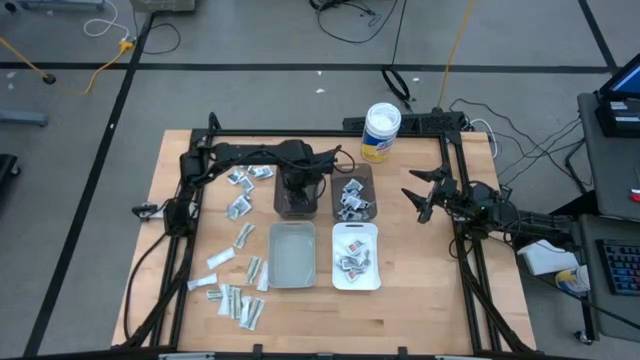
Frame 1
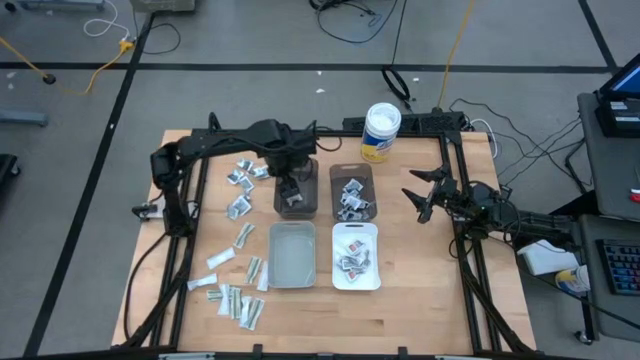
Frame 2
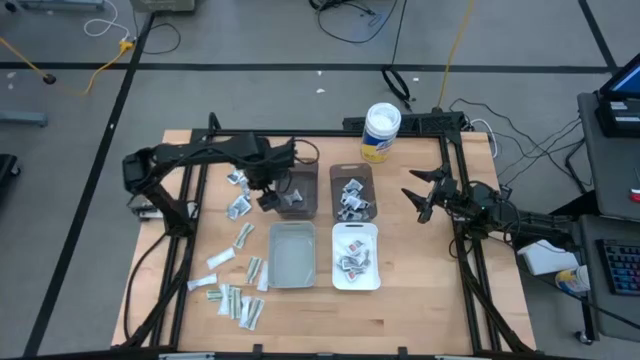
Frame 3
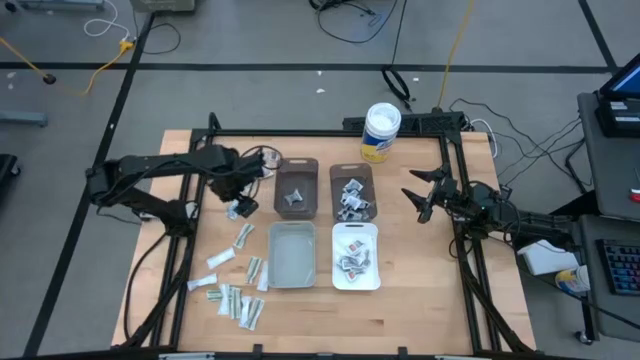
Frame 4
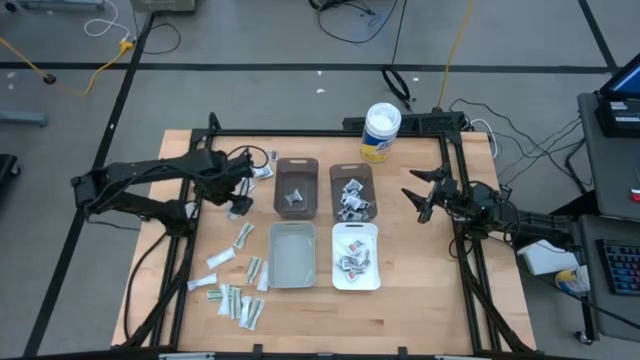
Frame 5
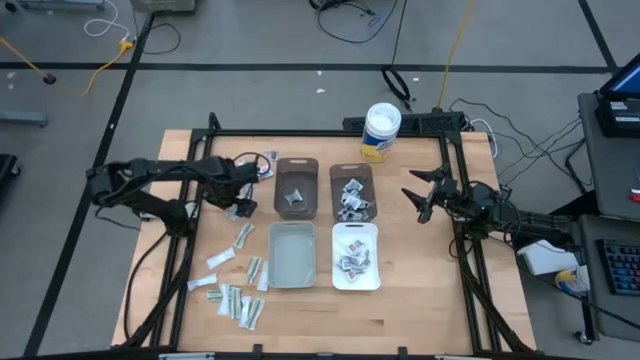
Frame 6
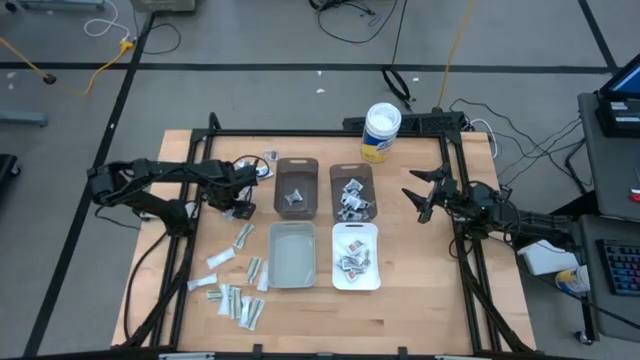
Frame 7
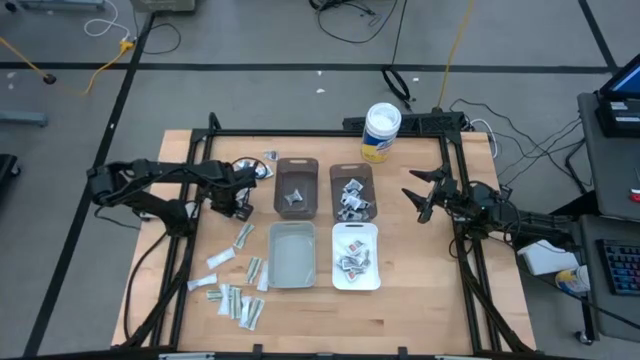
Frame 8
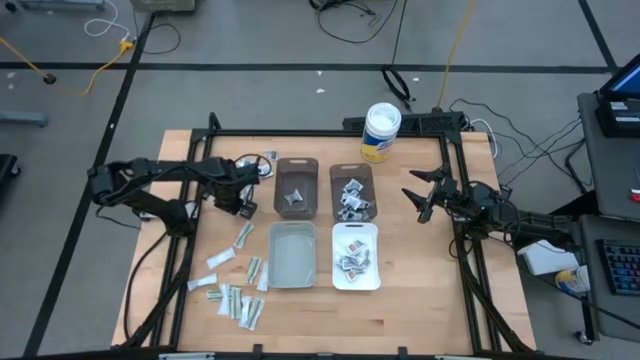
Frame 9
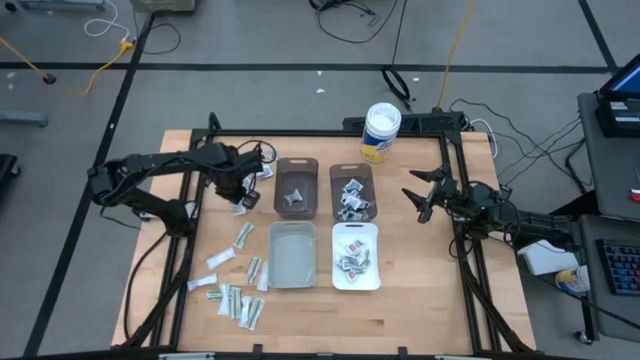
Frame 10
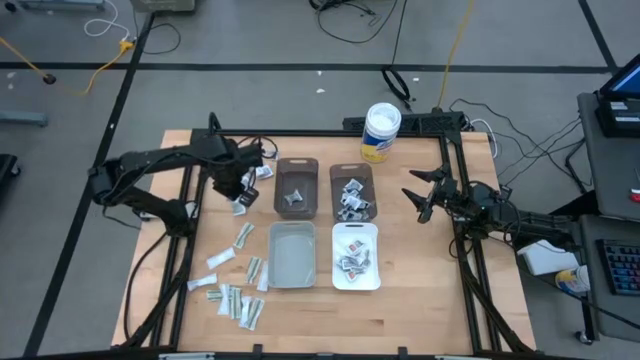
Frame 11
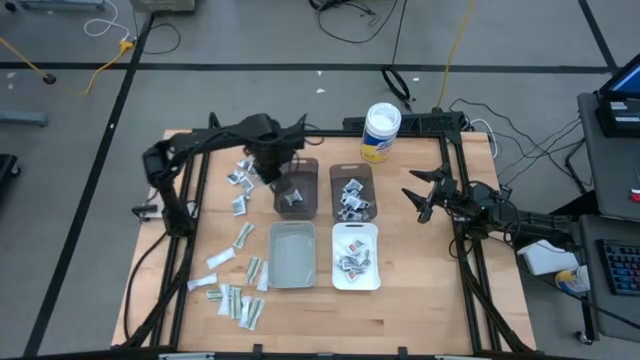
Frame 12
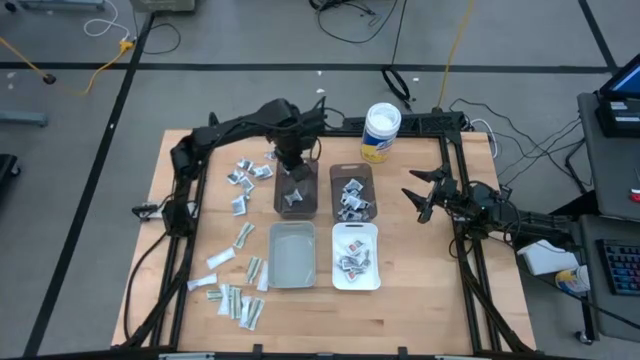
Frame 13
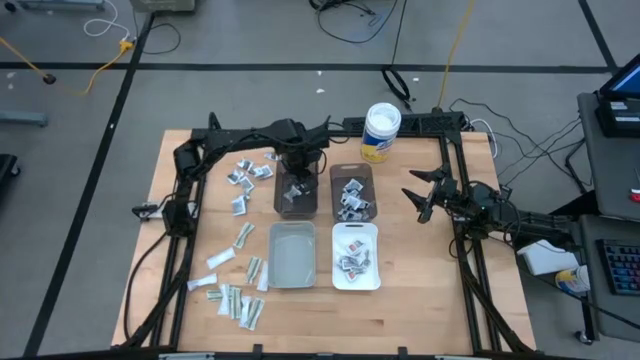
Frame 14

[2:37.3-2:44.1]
Task: Pick & Place First Aid Supplies
Put the gray pad into the left black bin

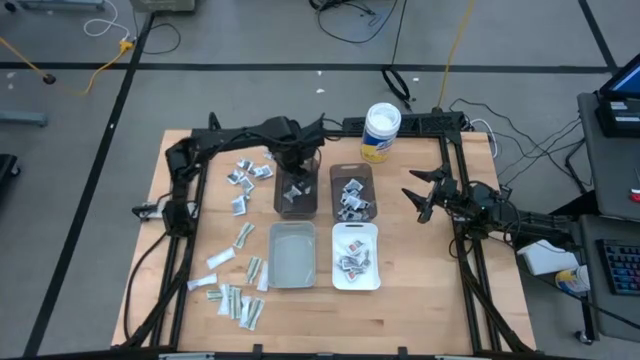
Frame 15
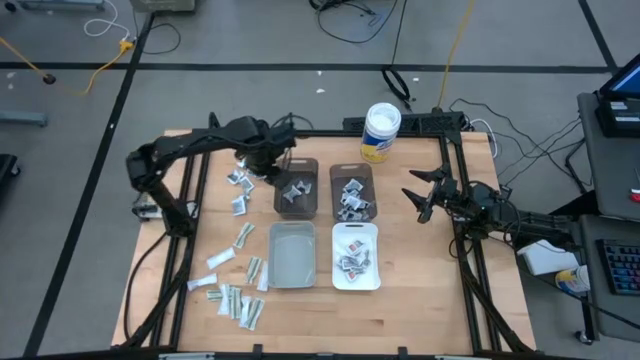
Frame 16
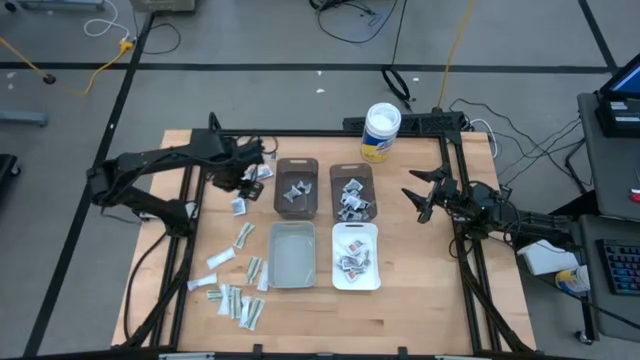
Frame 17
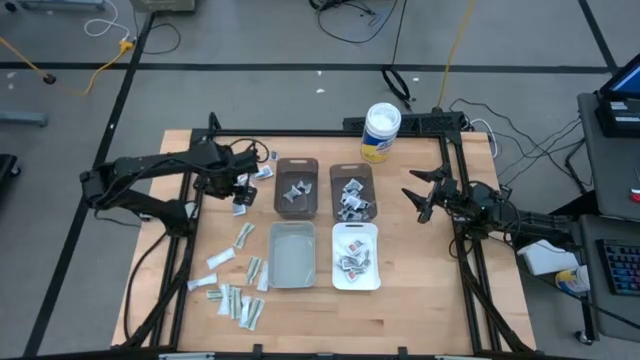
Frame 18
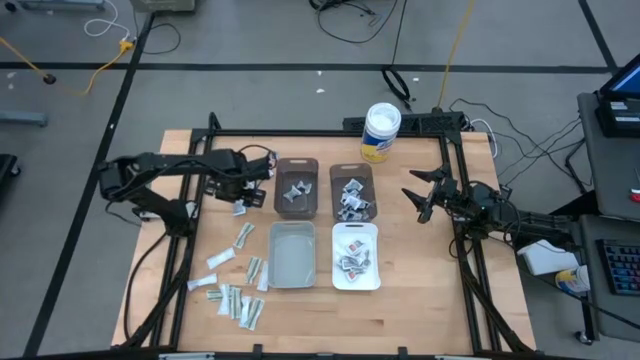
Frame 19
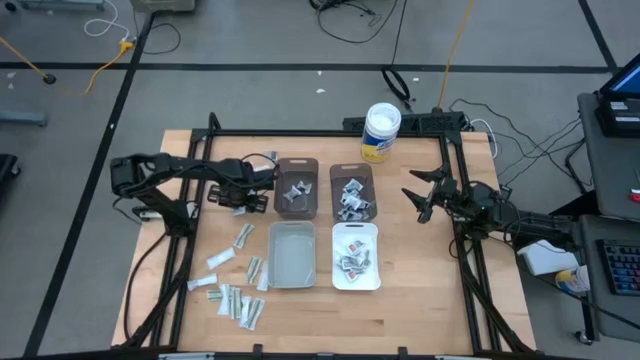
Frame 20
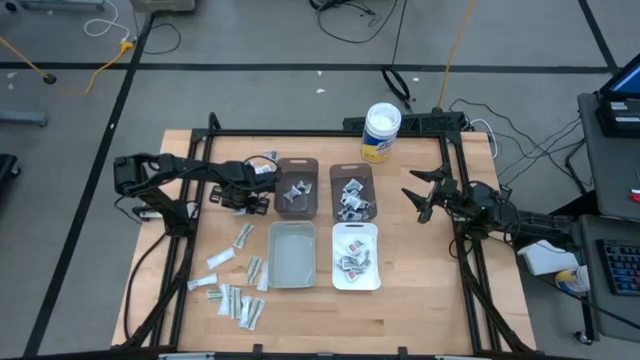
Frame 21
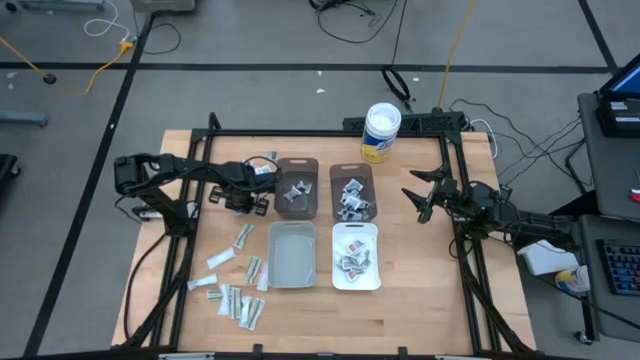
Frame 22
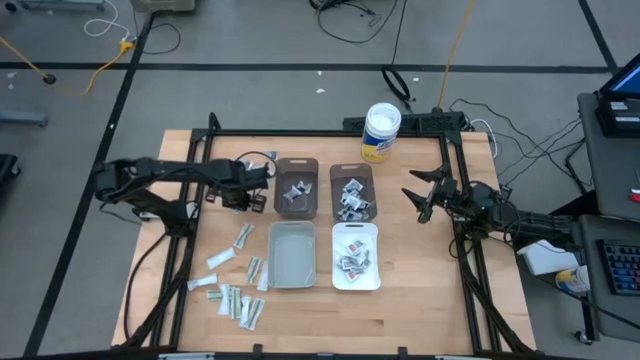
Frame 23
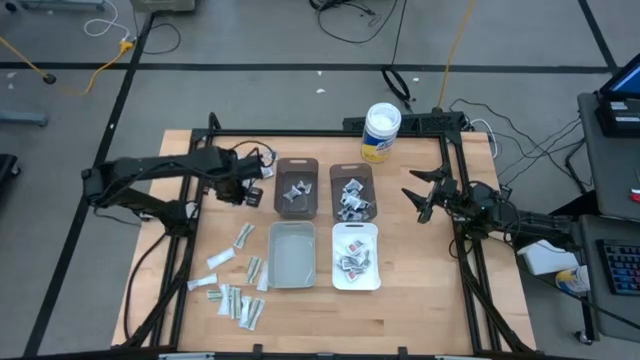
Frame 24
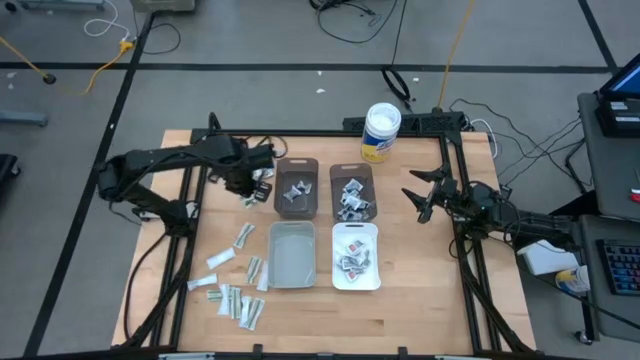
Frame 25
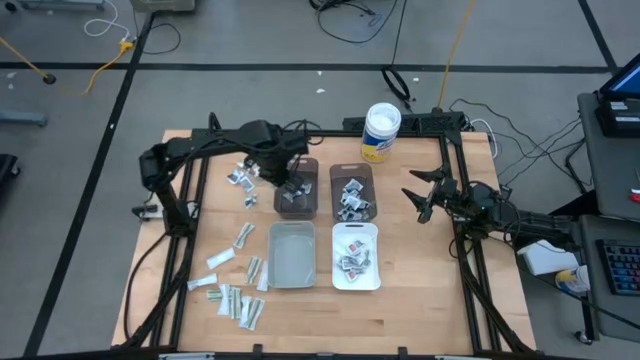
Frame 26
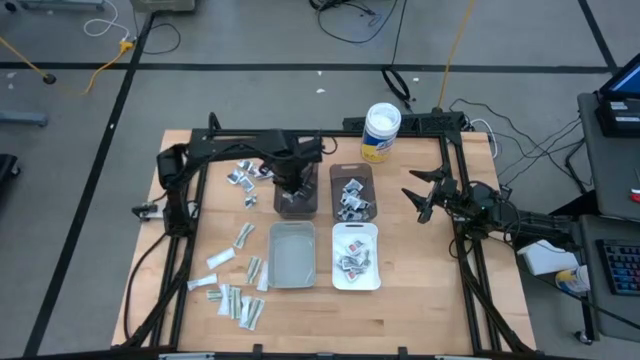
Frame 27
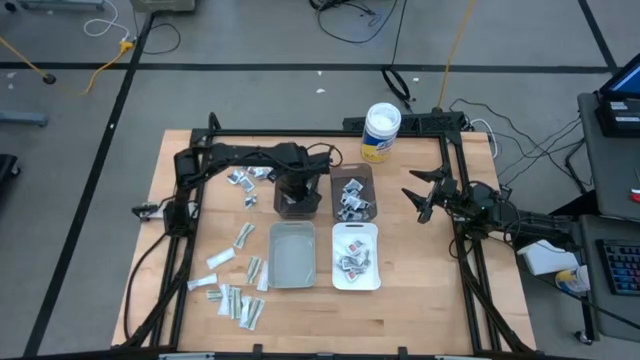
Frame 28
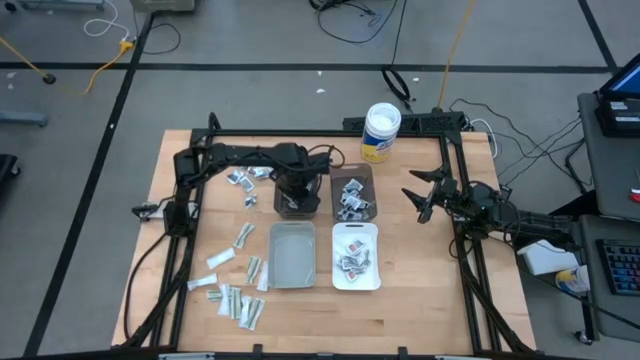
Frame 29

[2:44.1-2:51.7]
Put the gray pad into the left black bin

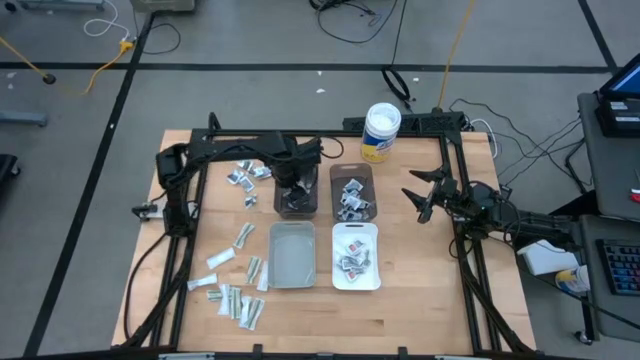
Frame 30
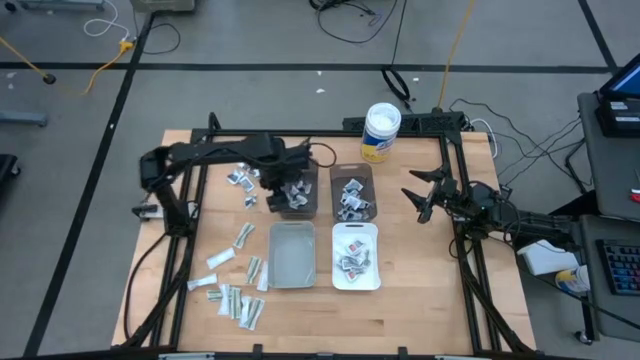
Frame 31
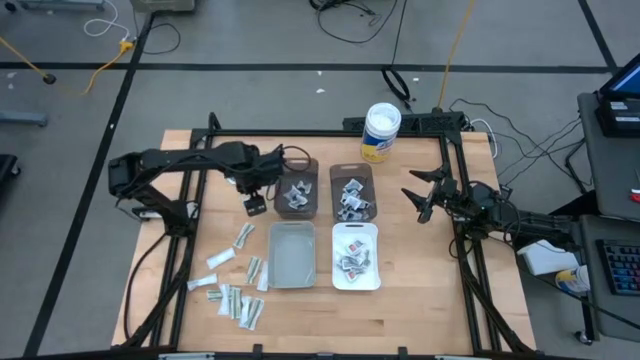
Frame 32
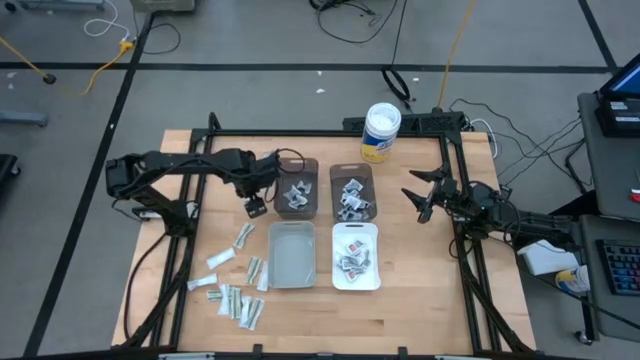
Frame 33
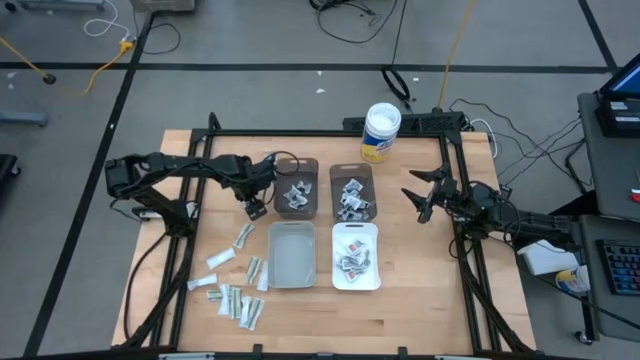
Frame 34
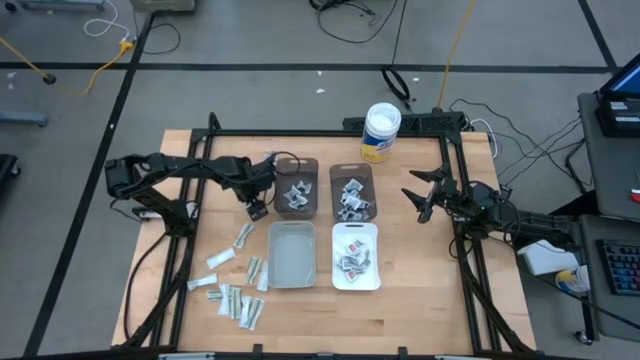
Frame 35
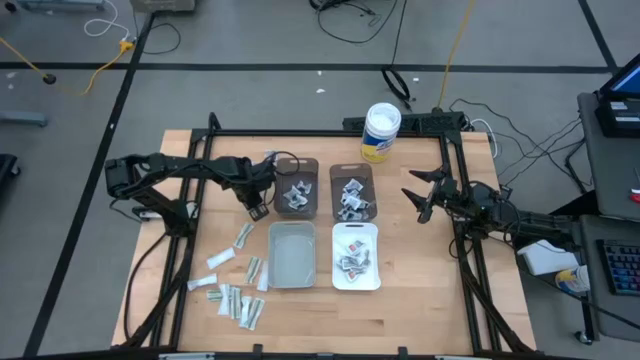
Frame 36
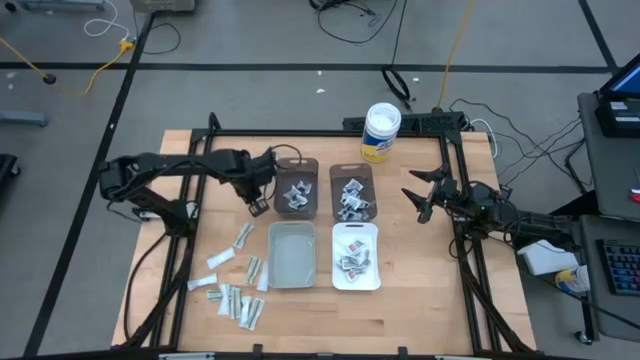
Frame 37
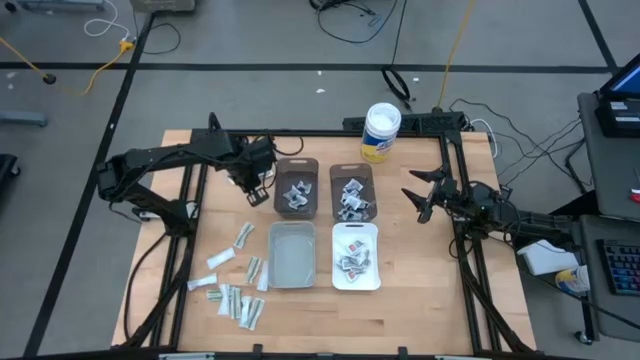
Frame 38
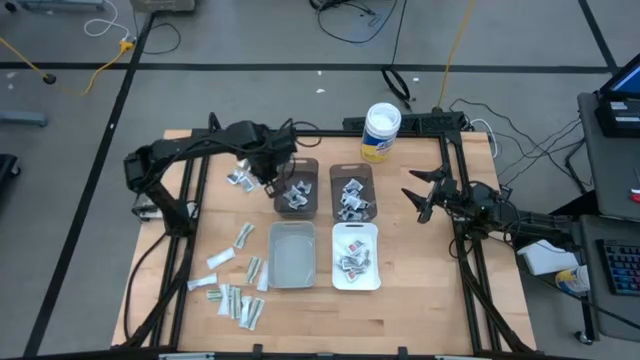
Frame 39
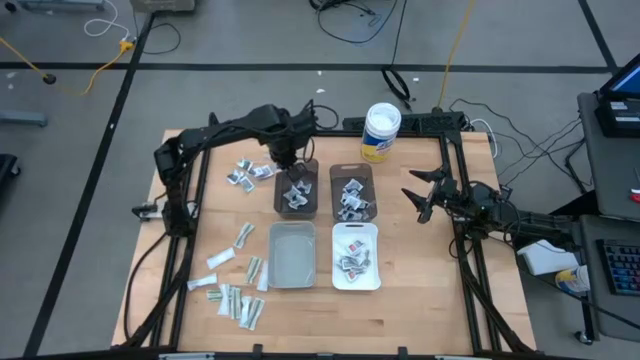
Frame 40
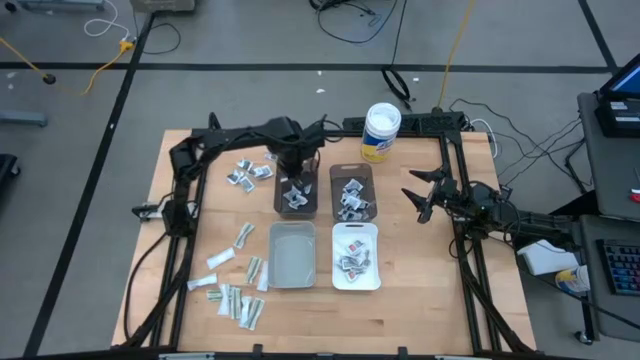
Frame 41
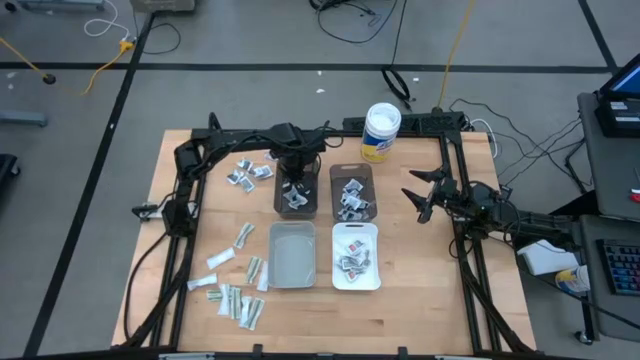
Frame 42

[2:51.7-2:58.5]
Put the gray pad into the left black bin

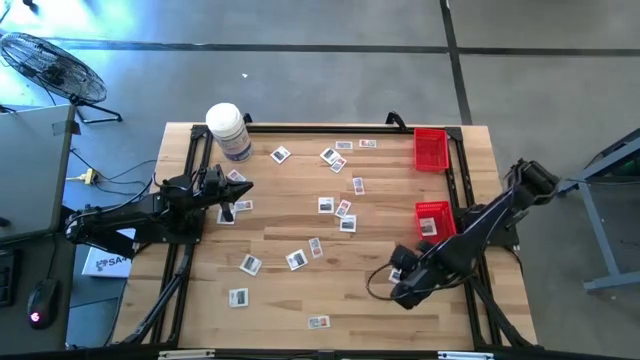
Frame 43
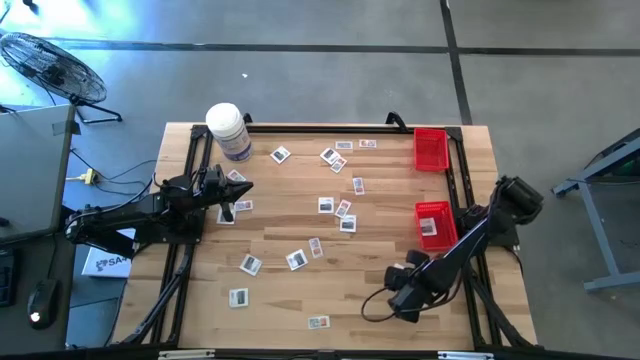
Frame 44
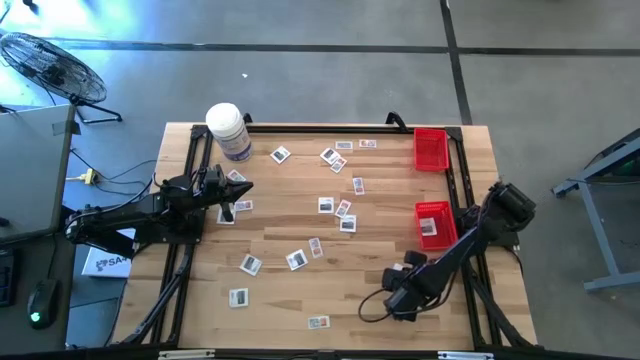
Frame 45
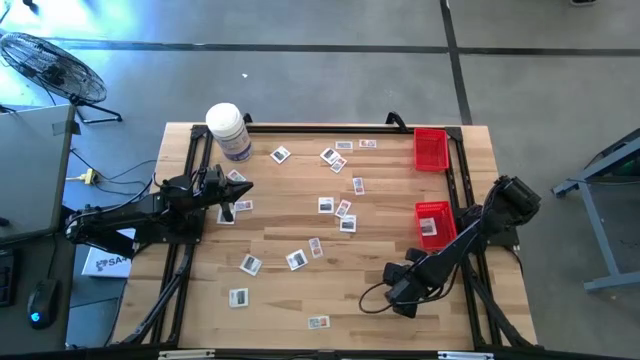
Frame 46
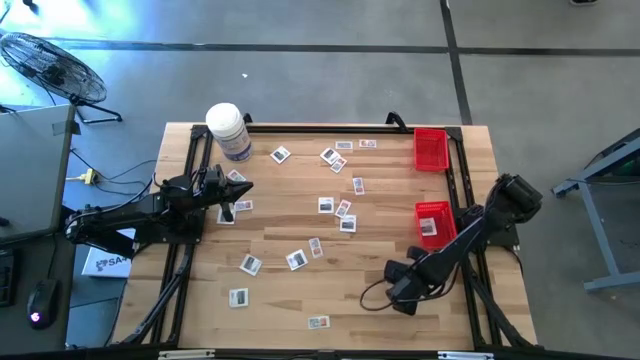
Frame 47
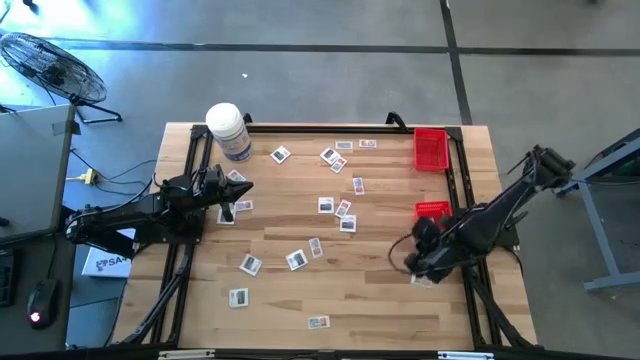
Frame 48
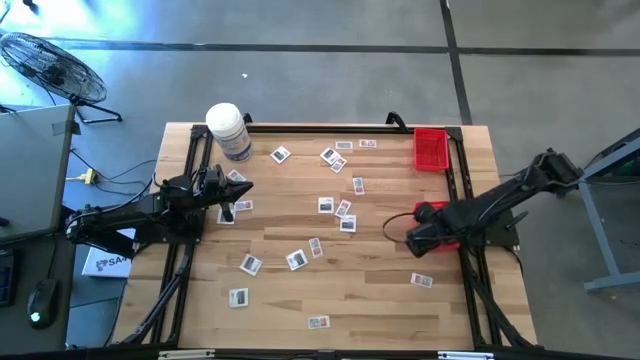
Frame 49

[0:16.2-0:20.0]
Task: Pick & Place First Aid Supplies
Put the towelette pack into the bottom basket
